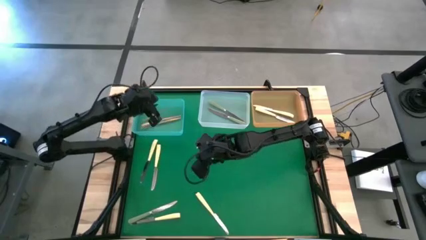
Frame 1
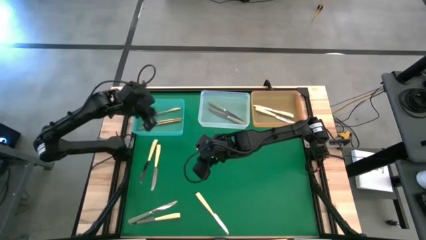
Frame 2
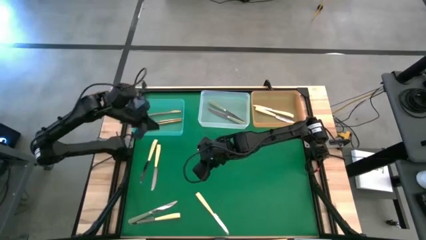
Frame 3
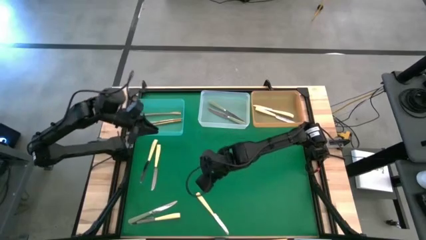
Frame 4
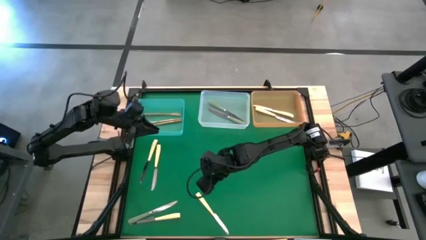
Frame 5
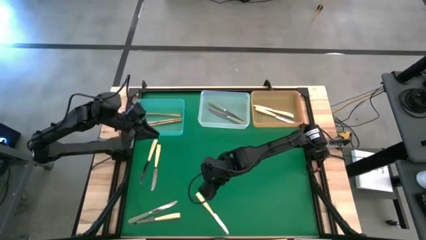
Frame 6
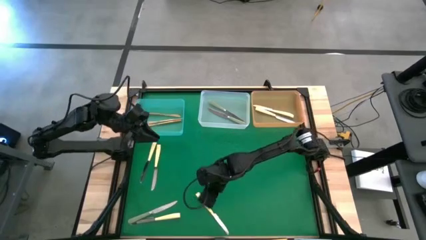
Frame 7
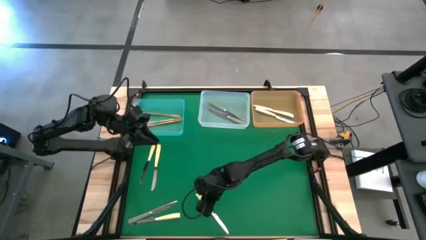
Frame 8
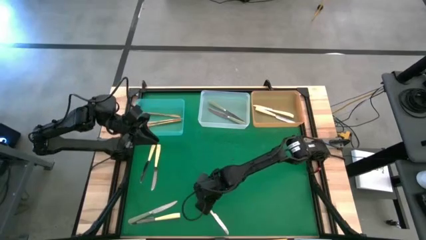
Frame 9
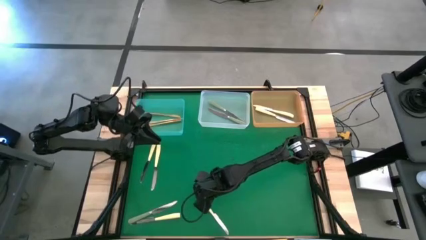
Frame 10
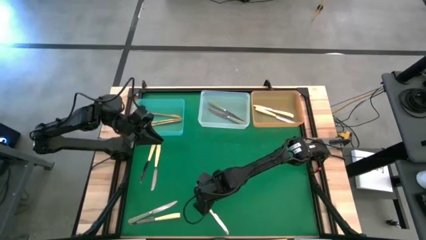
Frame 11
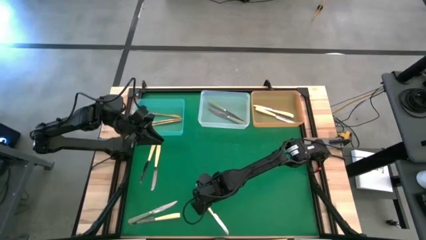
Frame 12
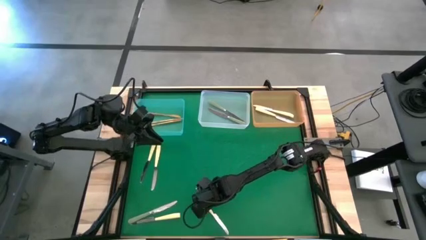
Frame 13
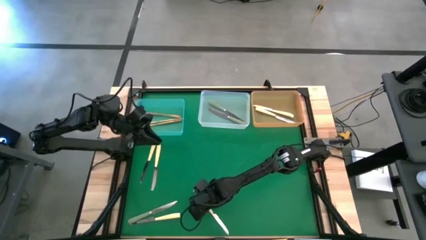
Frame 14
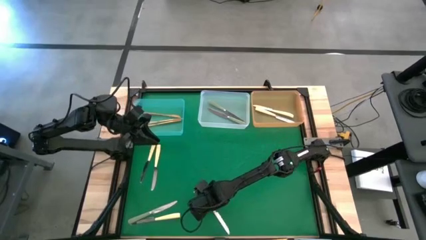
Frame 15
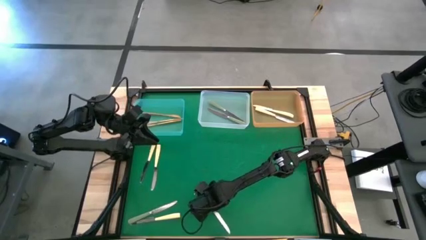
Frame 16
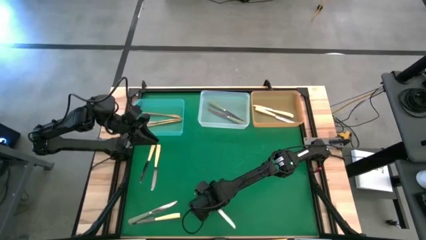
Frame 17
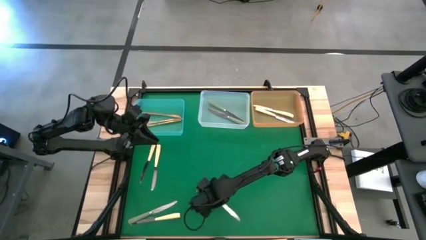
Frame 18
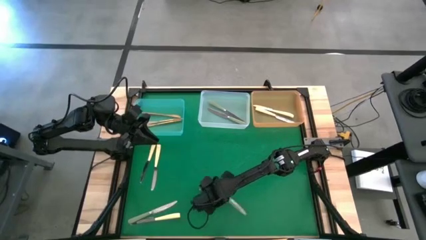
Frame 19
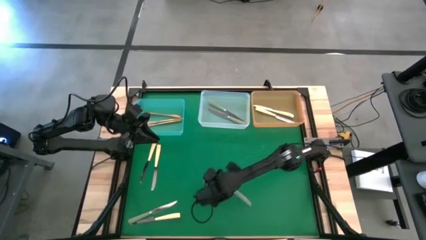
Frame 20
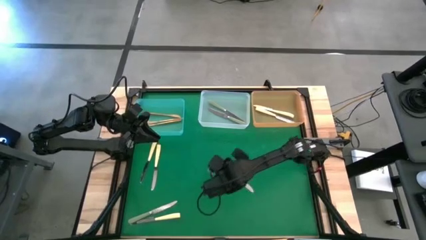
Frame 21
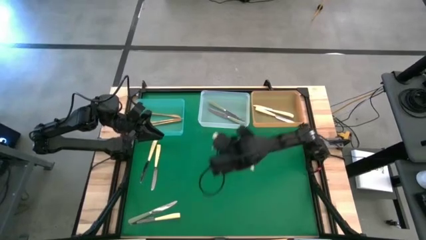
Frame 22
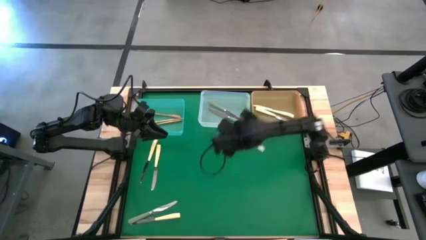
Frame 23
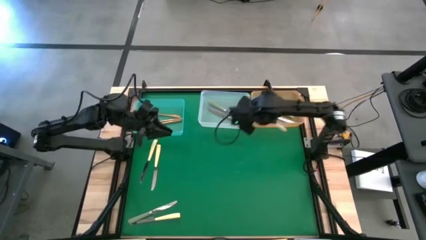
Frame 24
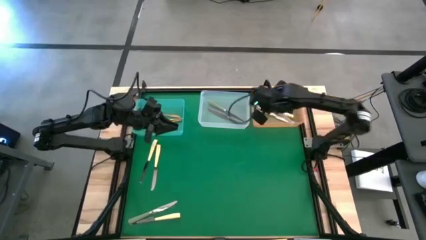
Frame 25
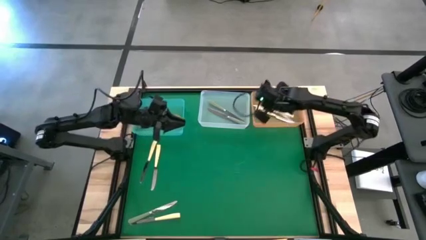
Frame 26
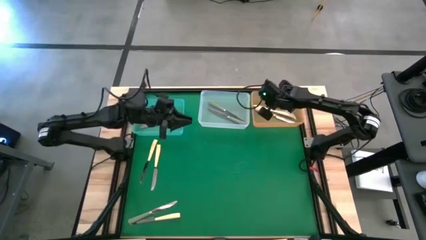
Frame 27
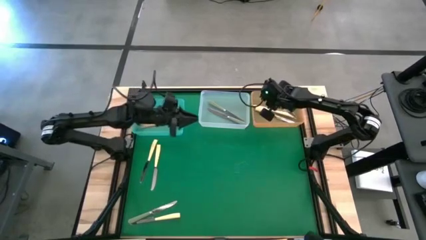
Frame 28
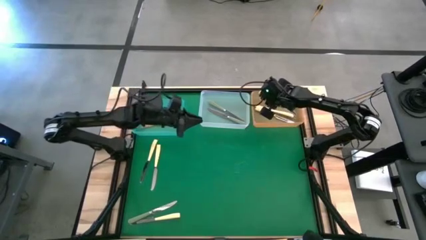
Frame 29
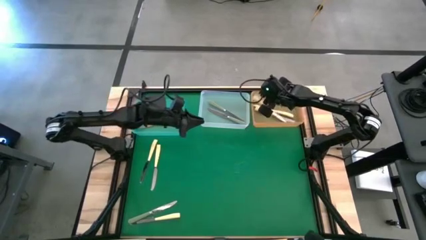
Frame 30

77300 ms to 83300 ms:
Task: Sort silverware by color (type)
Put the yellow knife into the orange bin

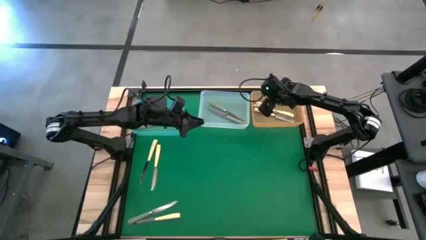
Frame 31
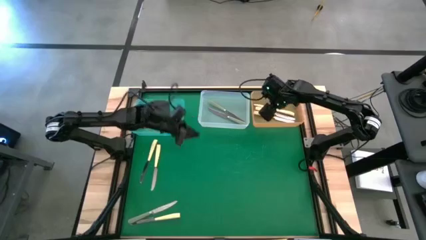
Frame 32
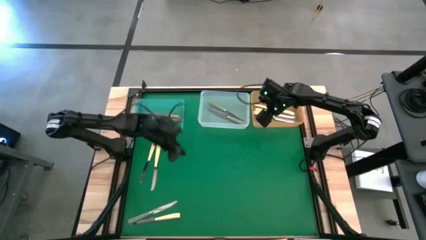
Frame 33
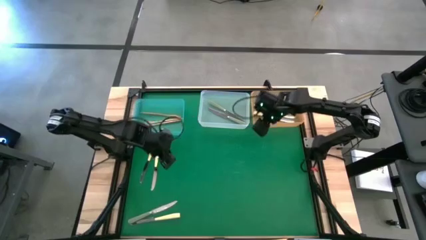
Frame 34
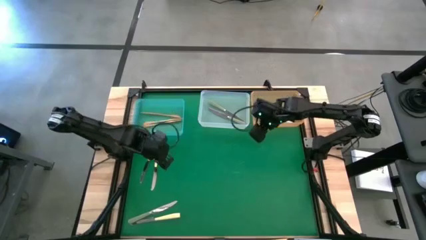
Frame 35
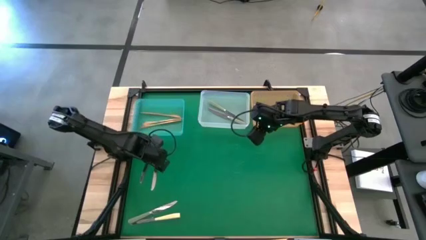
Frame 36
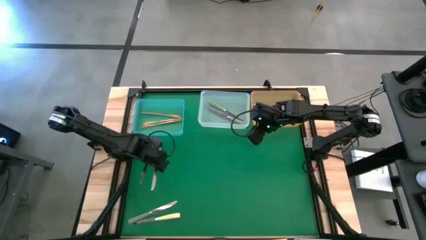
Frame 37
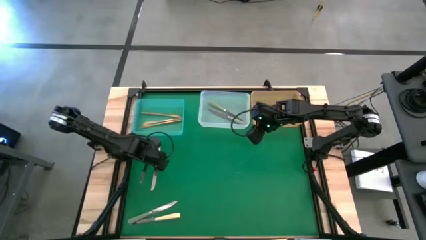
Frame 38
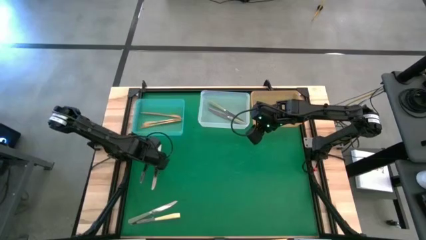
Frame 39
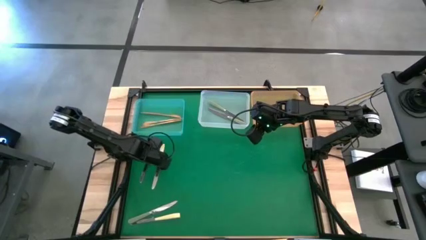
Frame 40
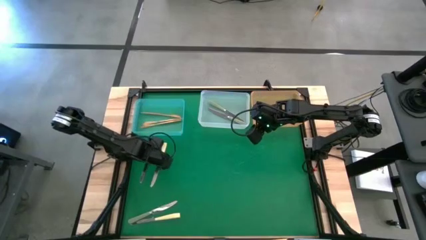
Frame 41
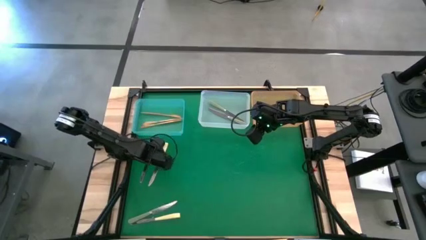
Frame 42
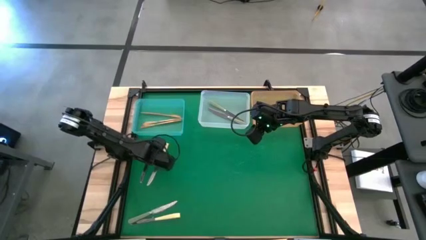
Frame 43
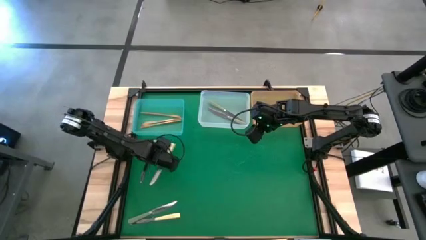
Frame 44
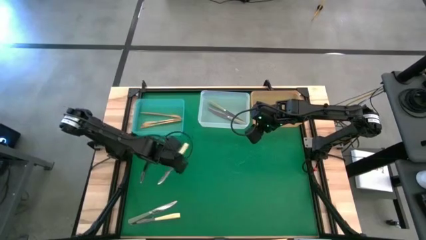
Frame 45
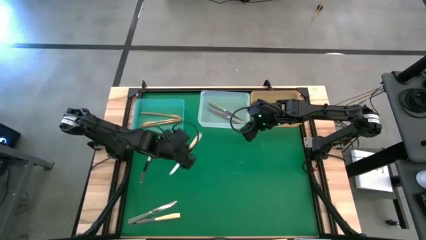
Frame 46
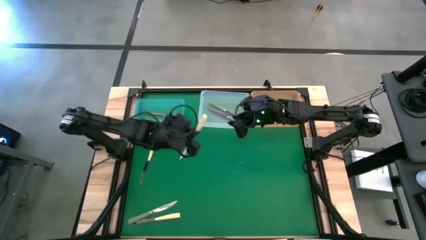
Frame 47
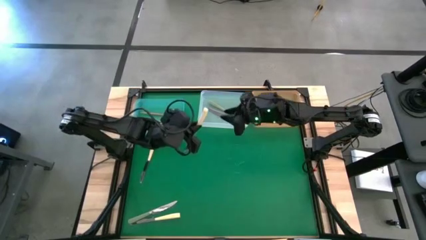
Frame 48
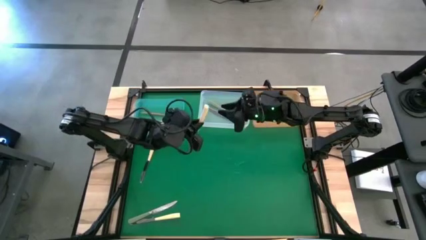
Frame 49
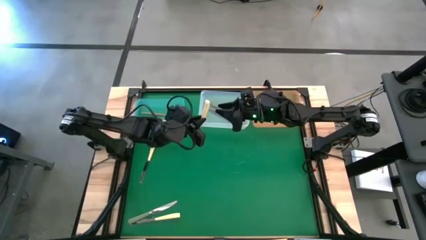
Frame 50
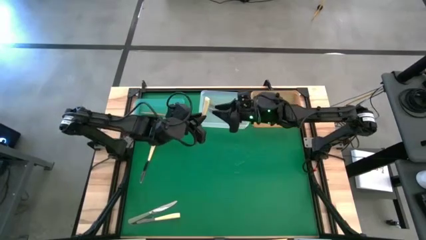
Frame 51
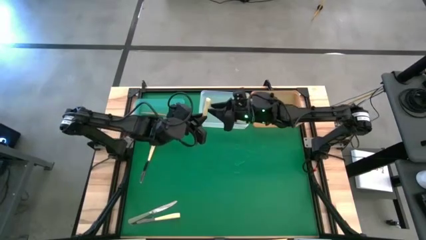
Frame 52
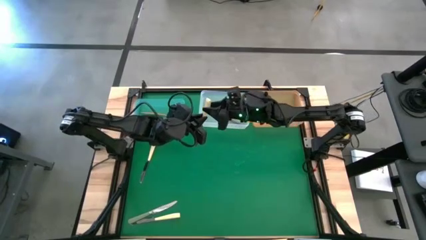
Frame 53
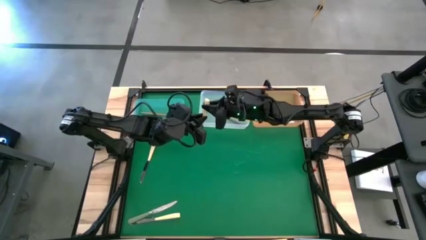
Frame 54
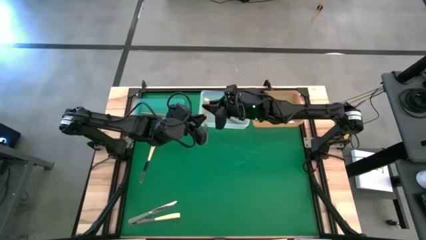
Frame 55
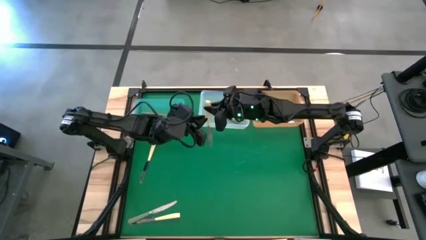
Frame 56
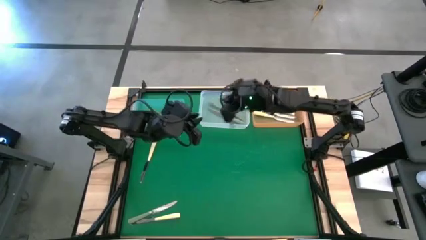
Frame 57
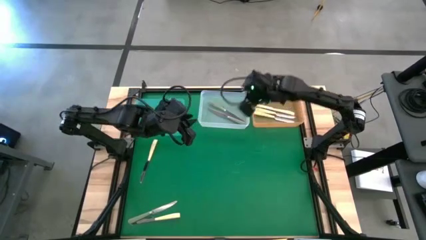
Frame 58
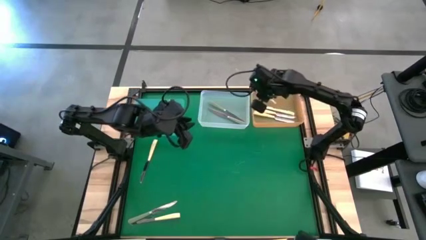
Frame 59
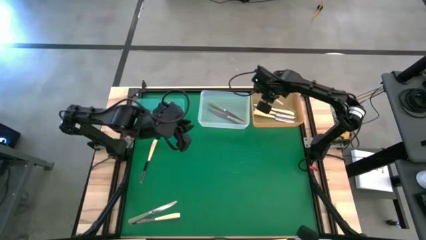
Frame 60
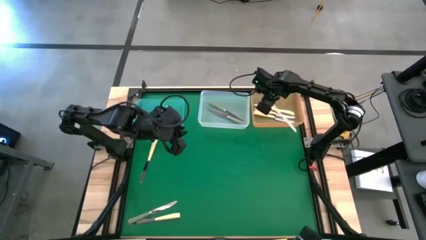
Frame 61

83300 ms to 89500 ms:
Put the yellow knife into the orange bin

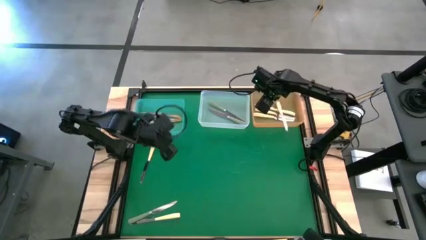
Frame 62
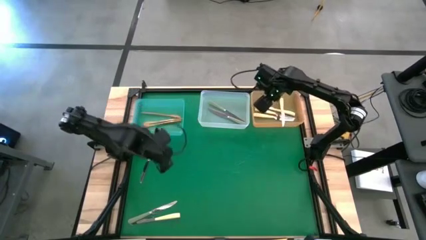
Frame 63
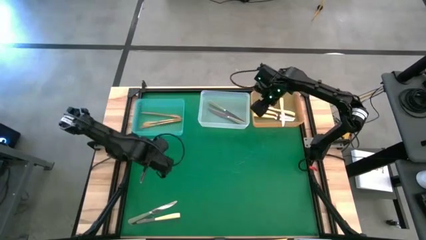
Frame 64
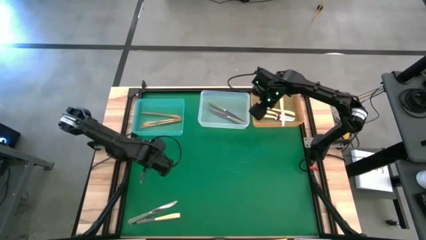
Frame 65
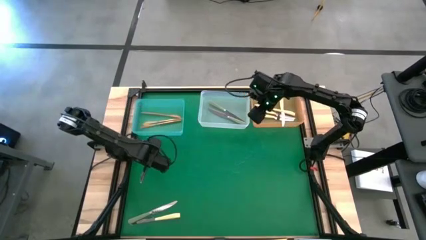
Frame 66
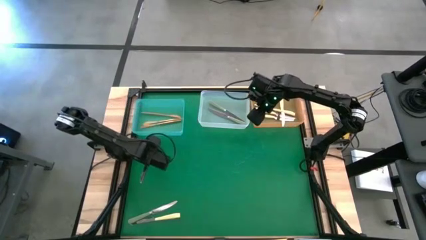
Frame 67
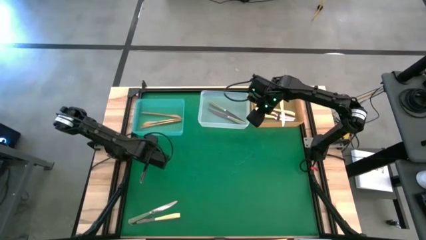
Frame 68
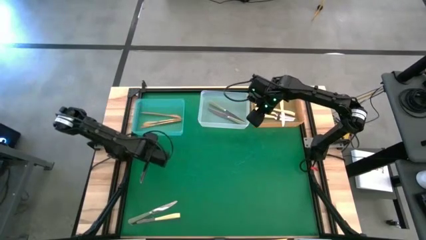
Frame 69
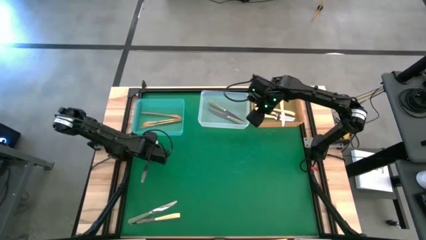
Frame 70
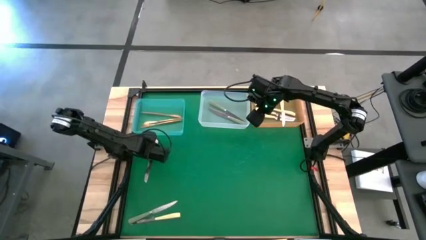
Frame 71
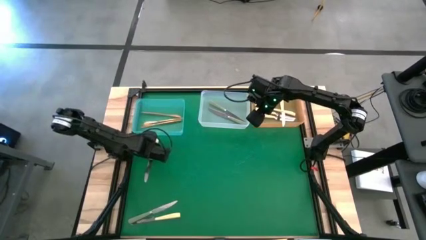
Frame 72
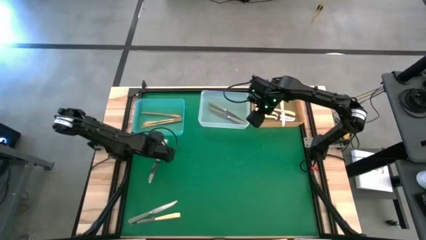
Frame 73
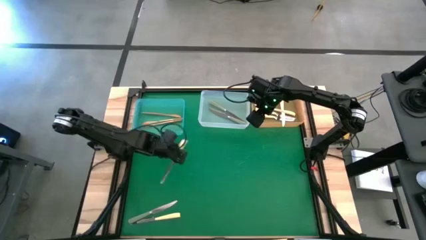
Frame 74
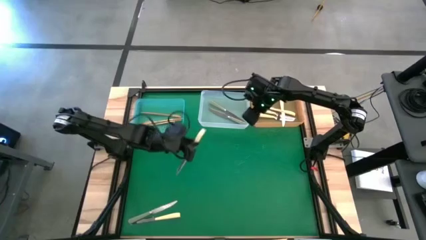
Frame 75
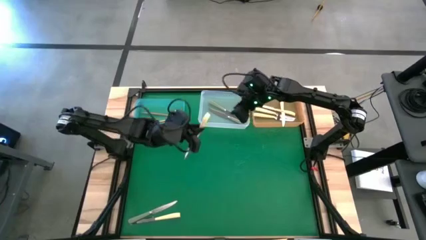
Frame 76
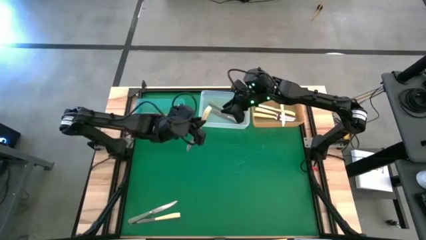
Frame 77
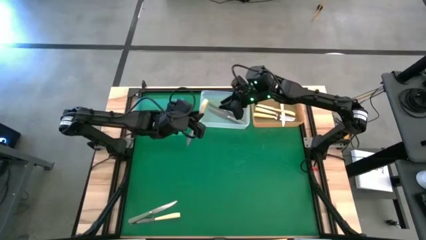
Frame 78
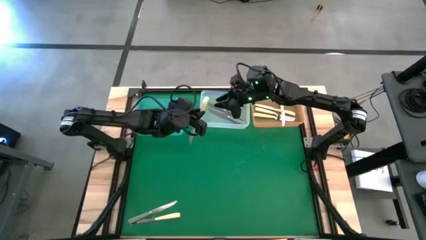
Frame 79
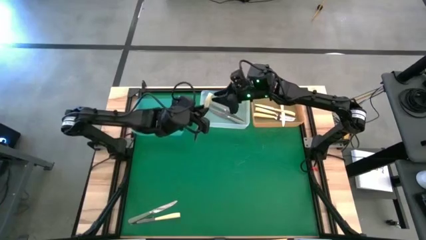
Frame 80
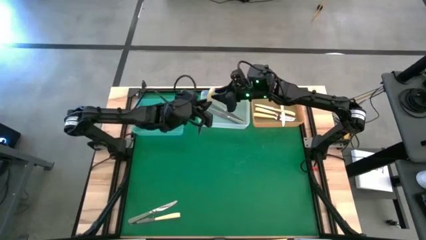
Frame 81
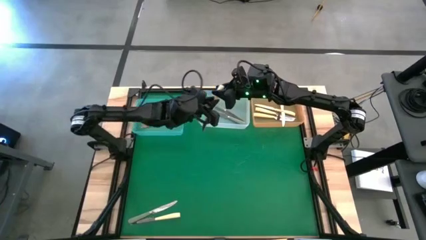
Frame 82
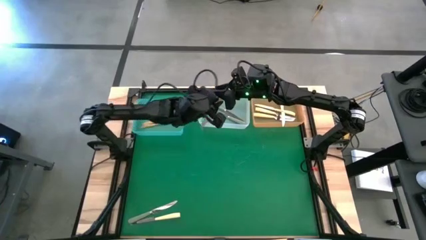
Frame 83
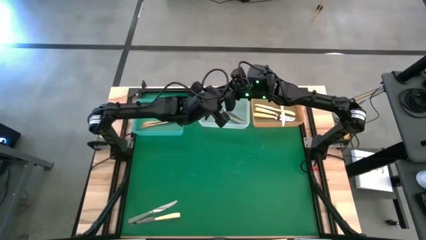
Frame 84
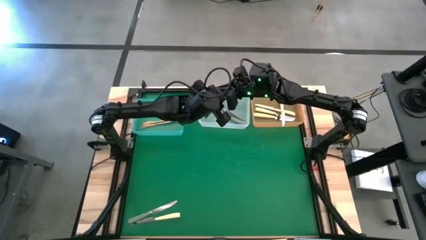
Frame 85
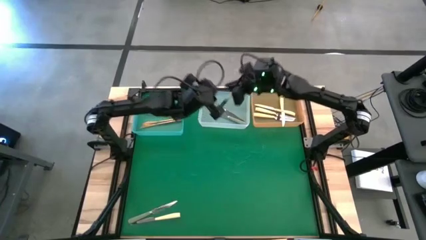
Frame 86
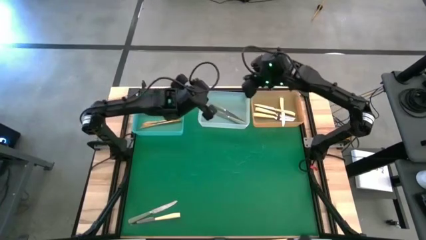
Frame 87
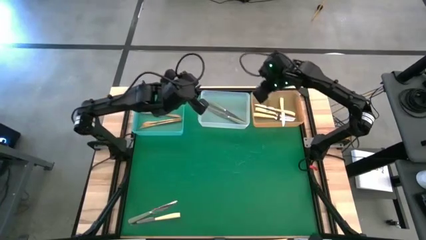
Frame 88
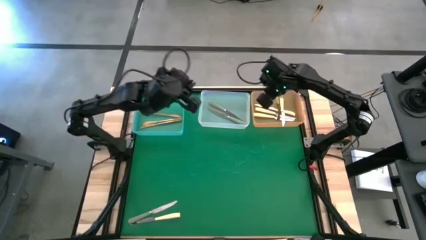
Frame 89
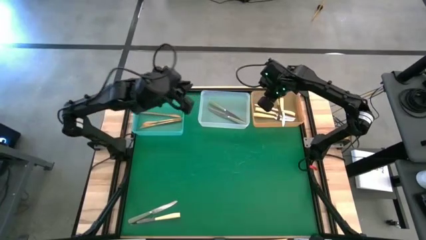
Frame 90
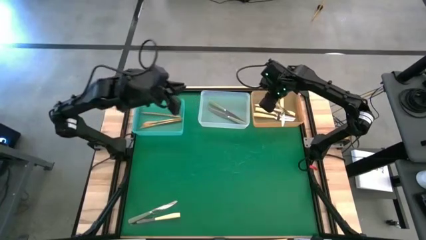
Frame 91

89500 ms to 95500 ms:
Put the yellow knife into the orange bin
